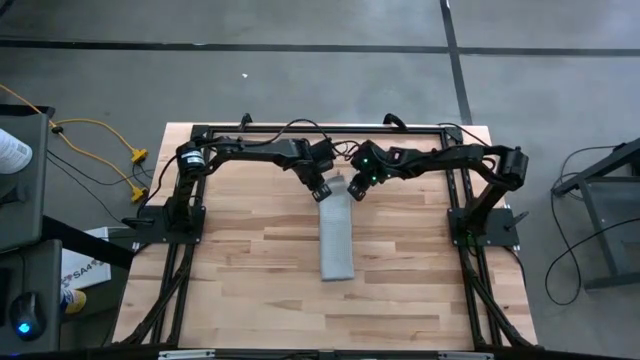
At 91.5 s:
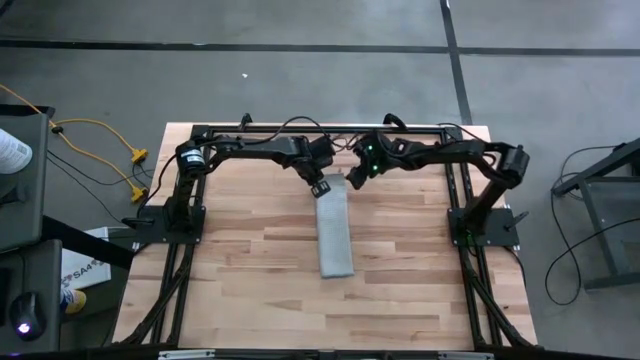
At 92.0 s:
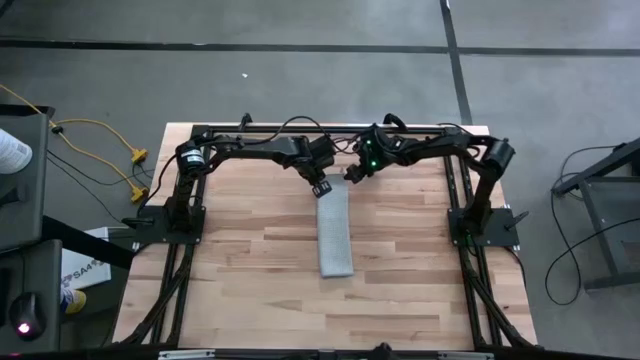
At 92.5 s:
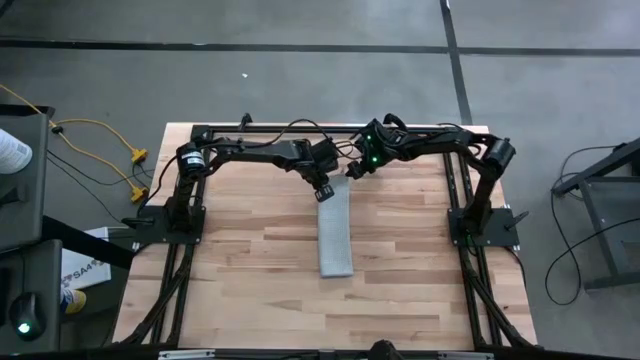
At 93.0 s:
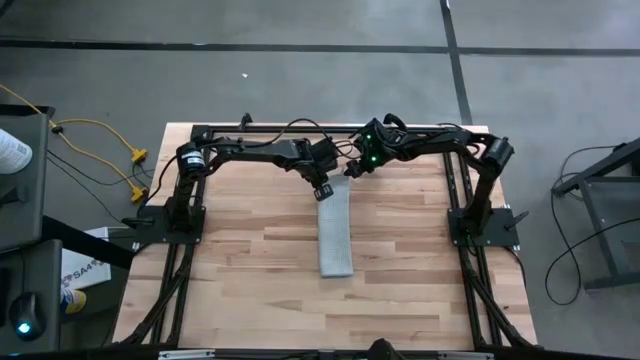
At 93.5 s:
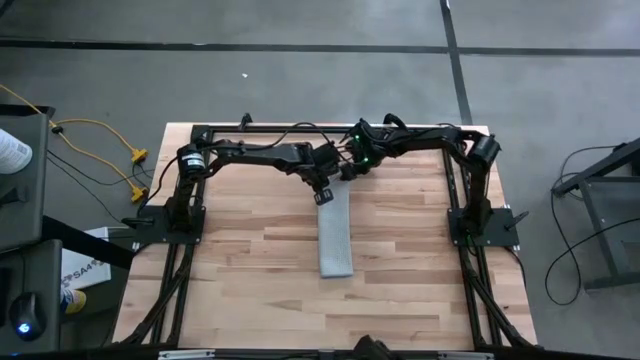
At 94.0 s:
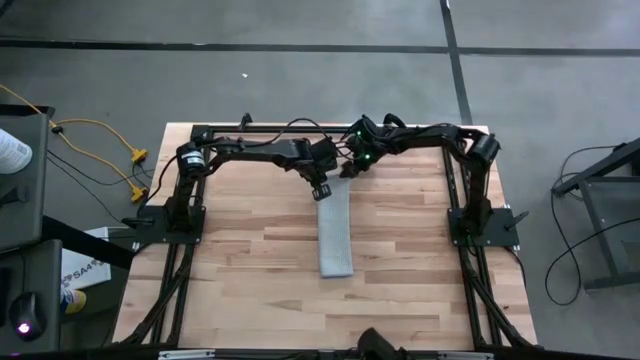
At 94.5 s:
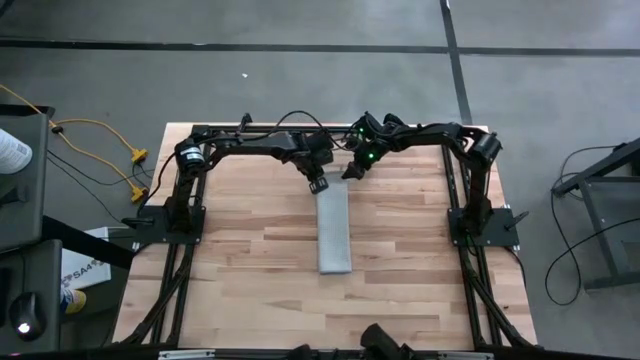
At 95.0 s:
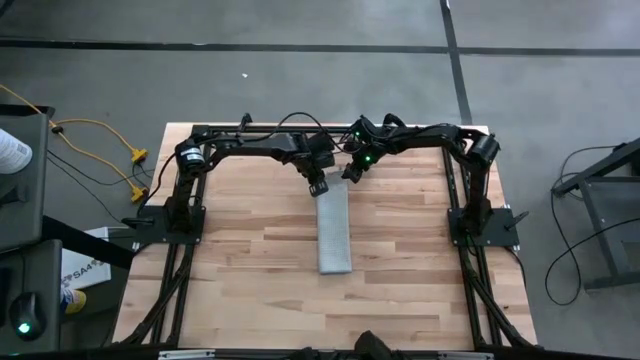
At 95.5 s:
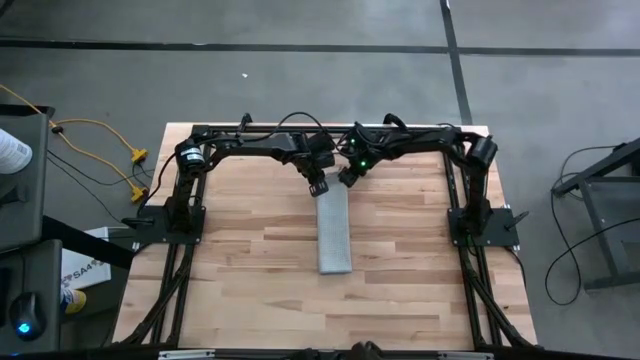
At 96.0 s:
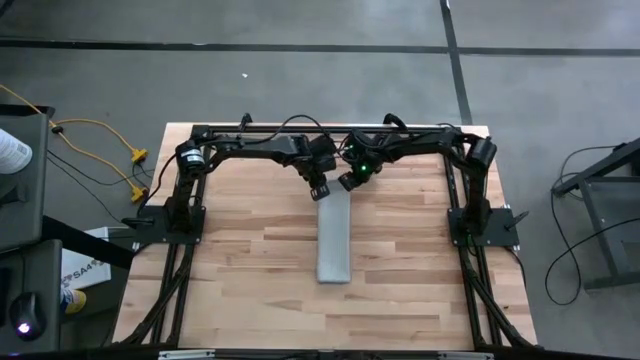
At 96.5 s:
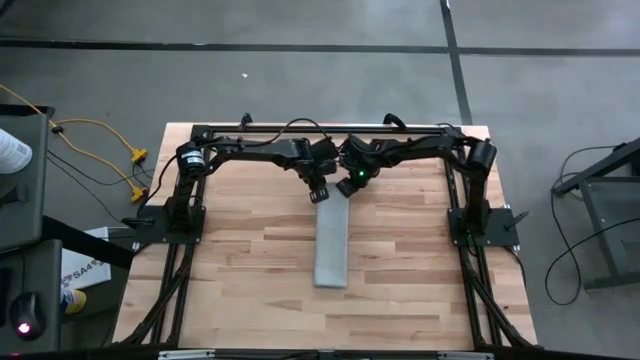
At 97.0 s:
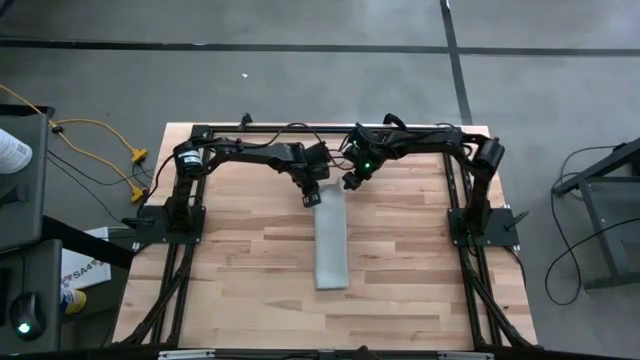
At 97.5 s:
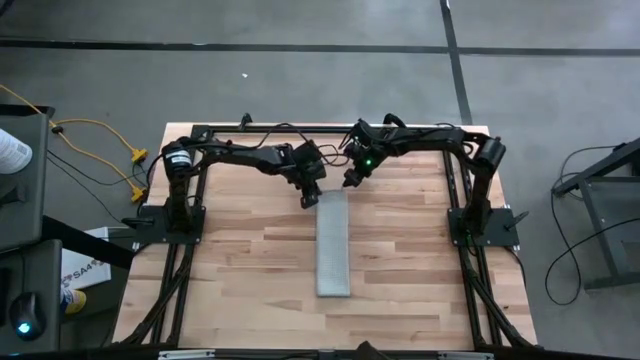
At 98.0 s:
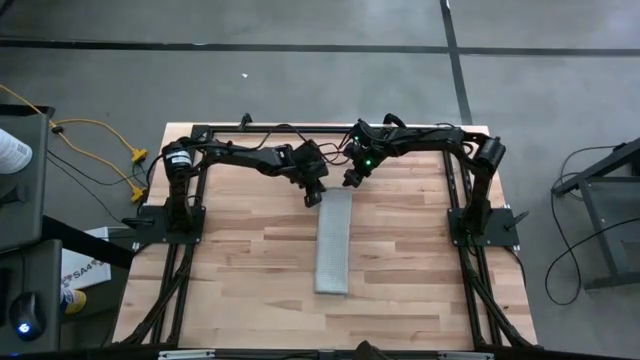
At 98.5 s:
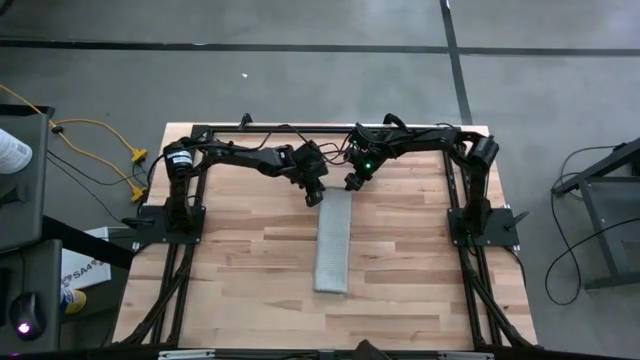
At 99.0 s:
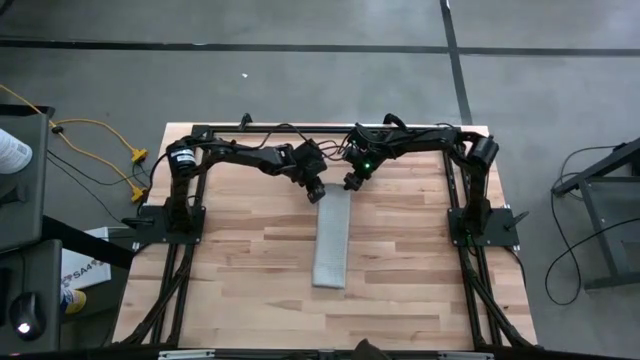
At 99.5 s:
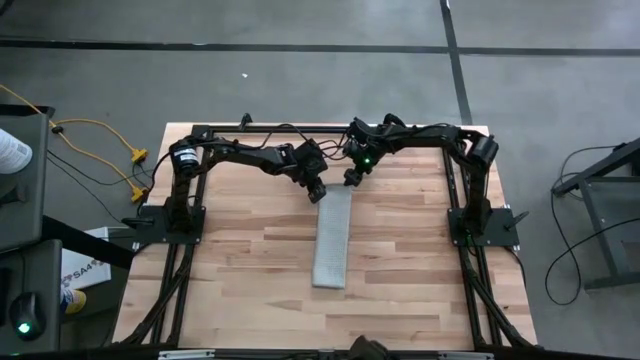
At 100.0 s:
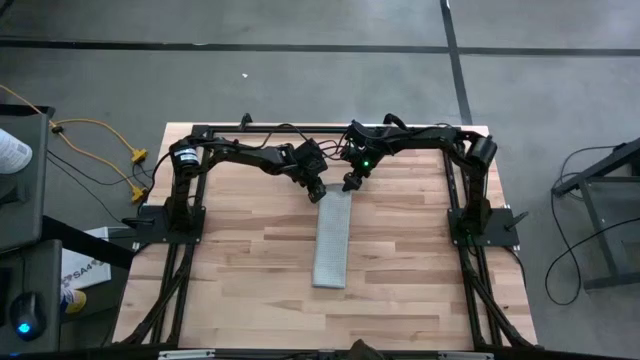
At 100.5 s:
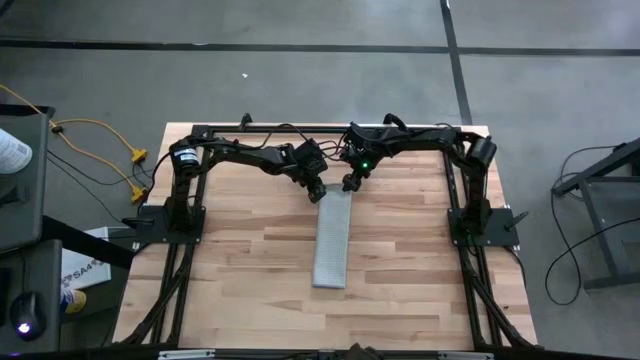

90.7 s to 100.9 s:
Task: Fold microfiber towels
Fold the gray microfiber towel

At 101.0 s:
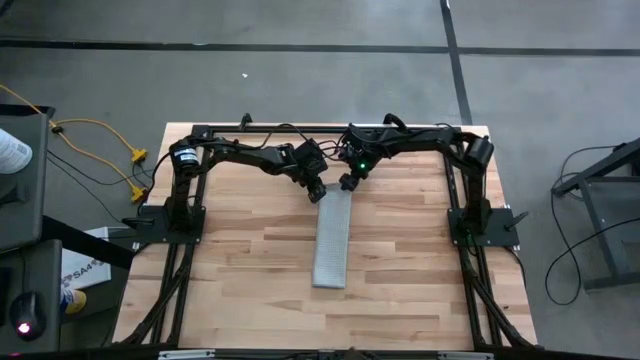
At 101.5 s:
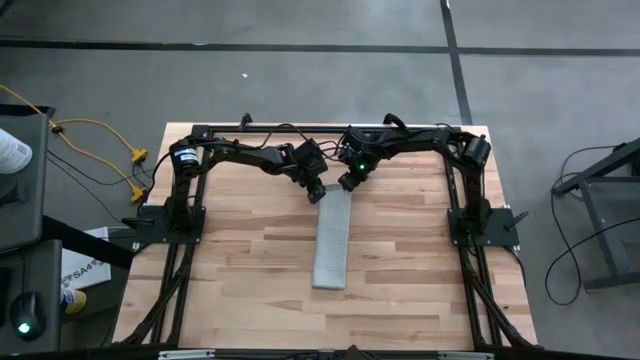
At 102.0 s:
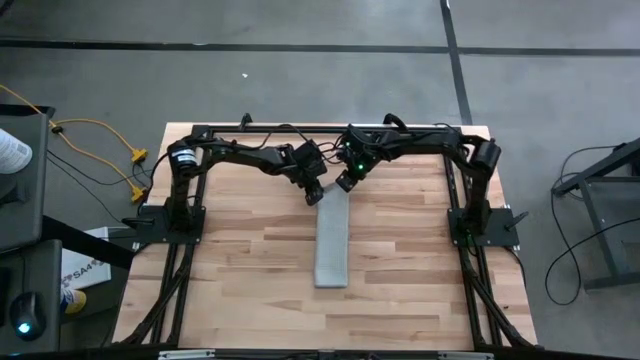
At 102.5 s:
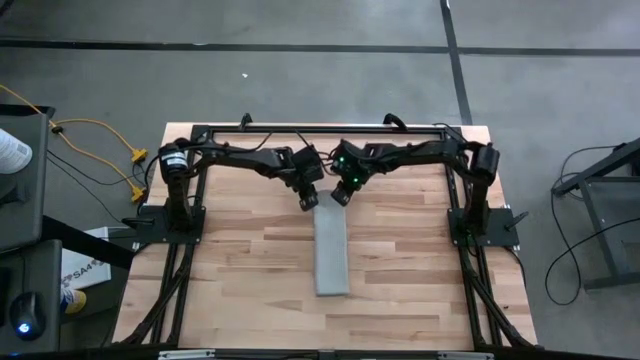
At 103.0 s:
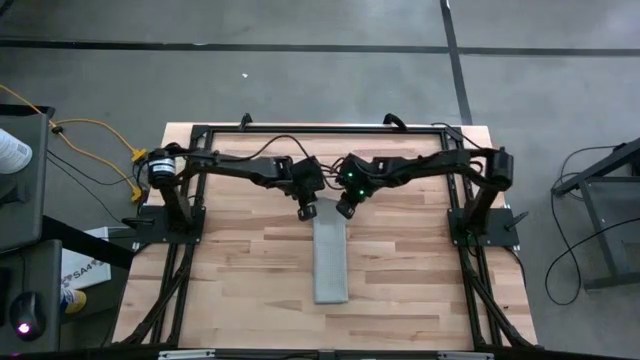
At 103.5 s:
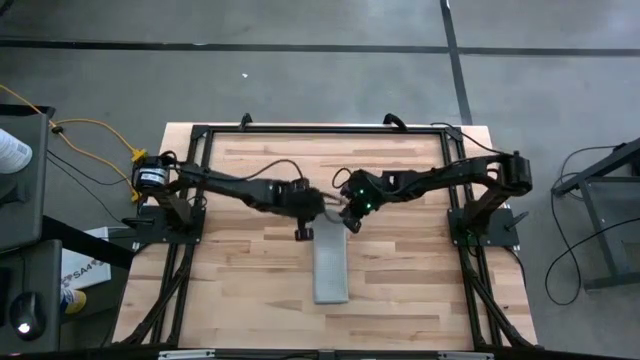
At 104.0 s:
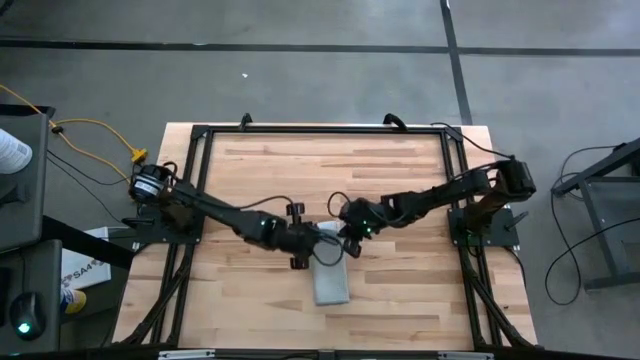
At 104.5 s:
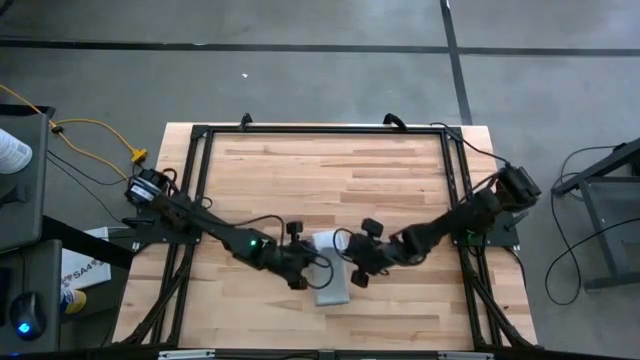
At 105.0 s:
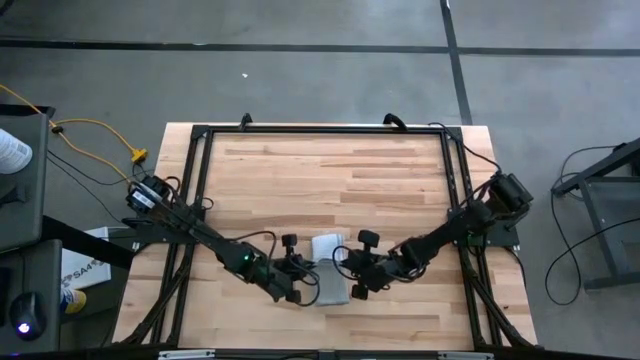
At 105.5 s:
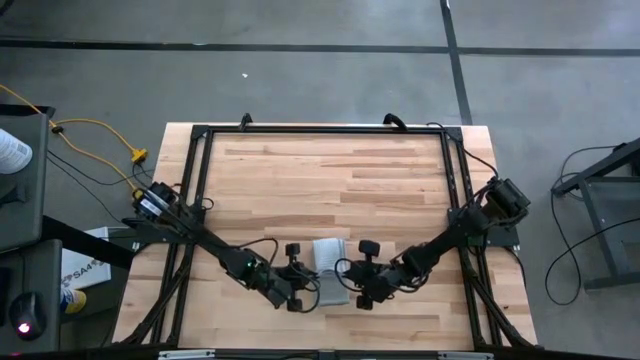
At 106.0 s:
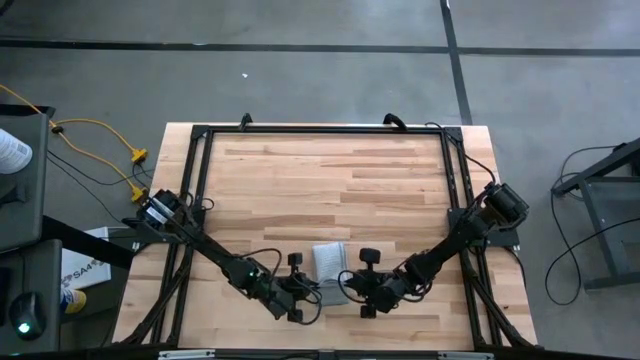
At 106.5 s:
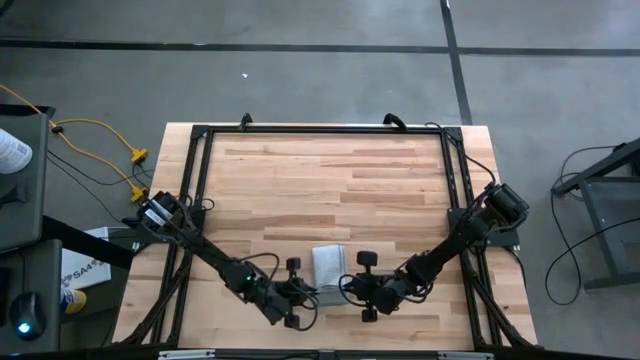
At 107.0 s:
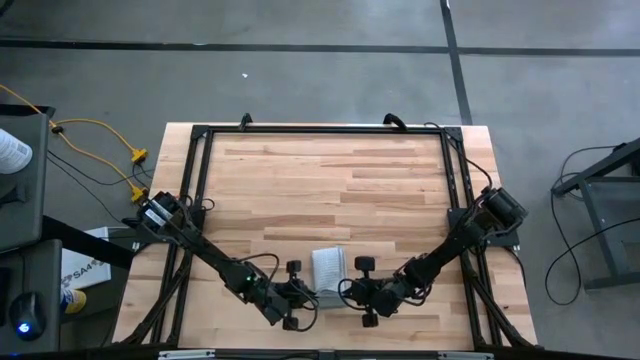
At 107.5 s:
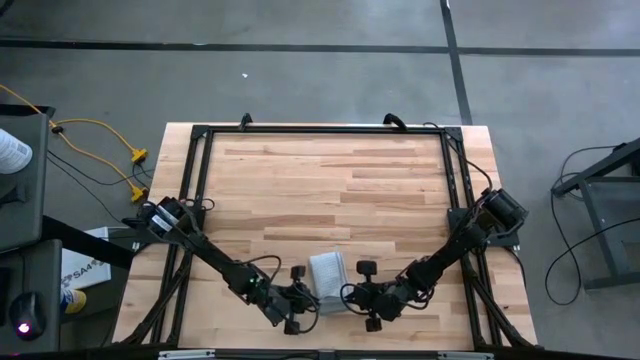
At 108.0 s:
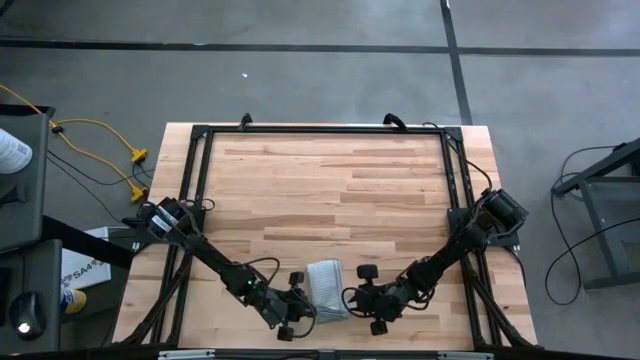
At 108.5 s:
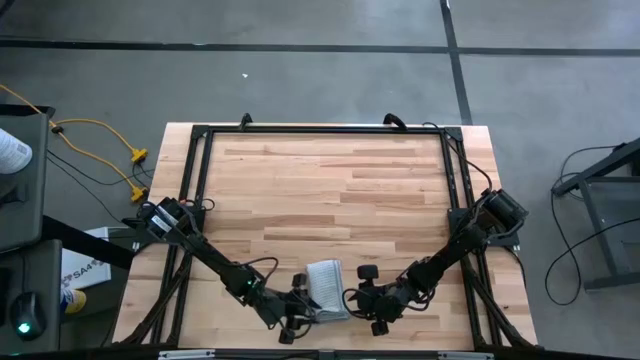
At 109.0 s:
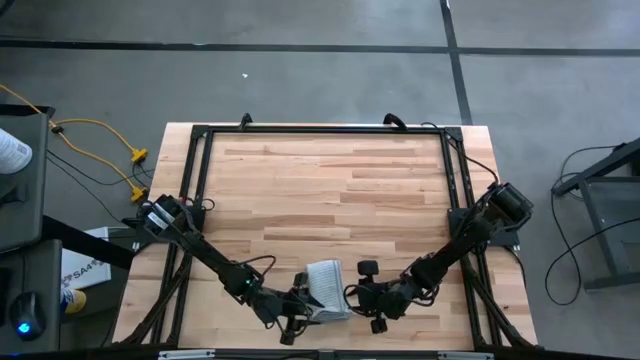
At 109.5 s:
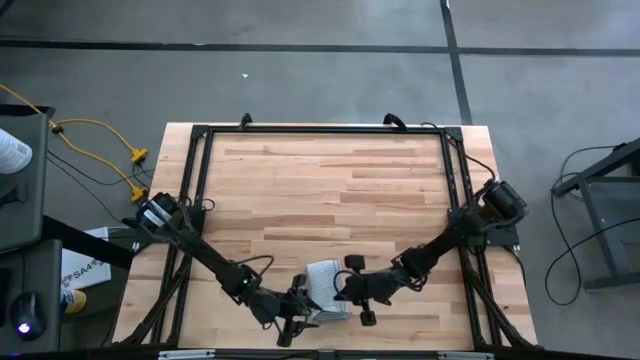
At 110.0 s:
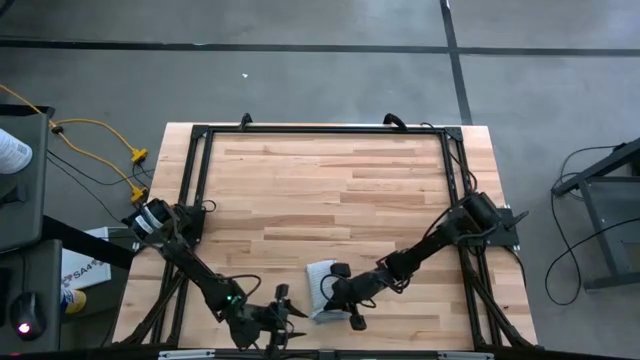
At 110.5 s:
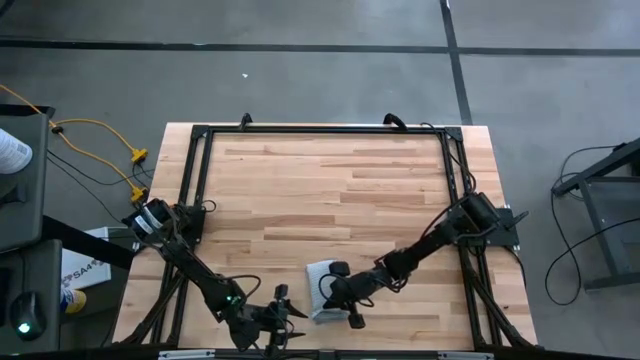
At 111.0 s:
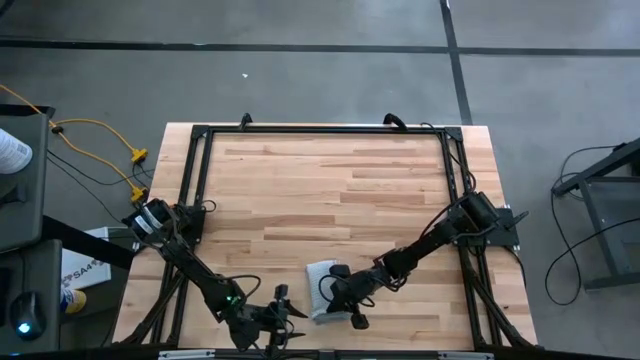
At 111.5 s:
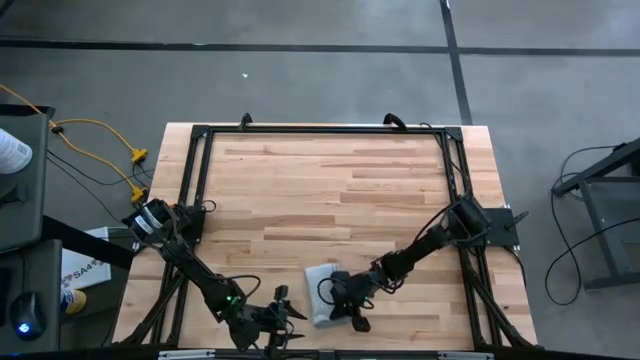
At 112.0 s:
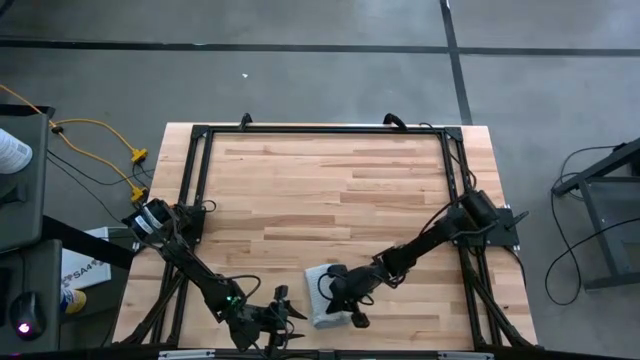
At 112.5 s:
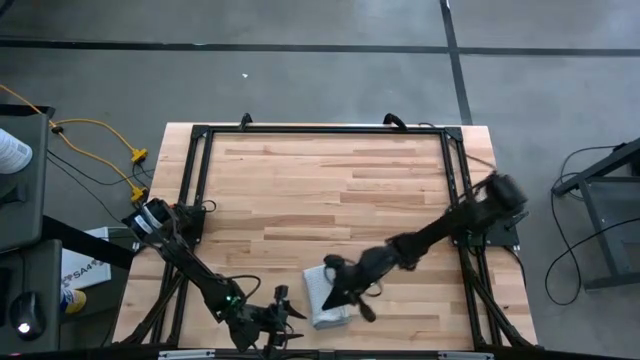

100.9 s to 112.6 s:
Fold the gray microfiber towel
